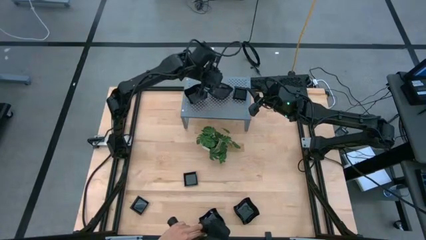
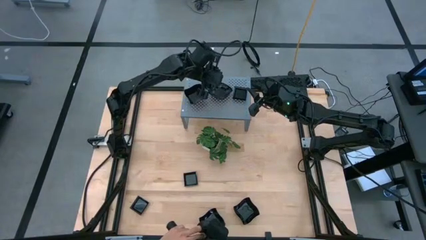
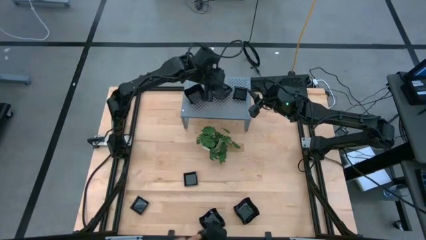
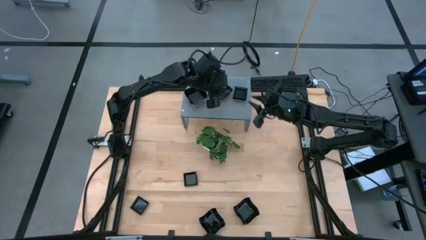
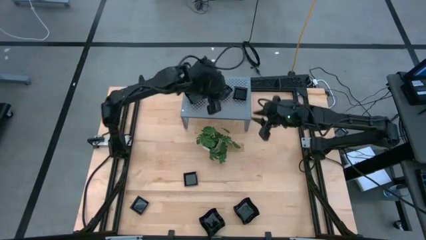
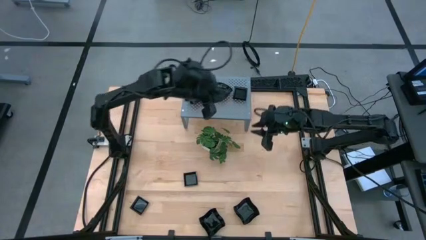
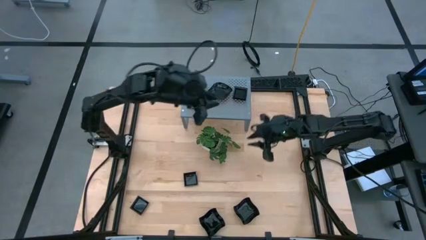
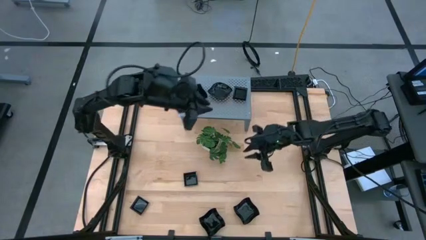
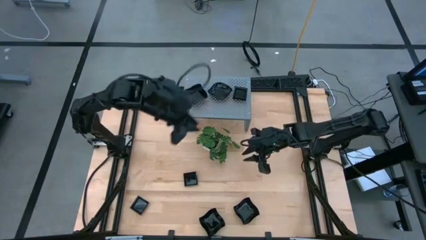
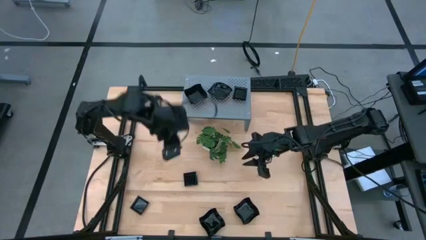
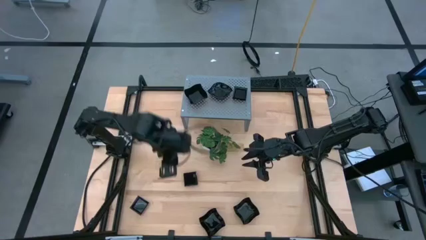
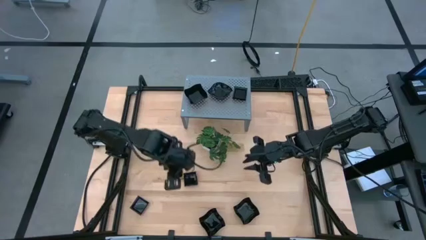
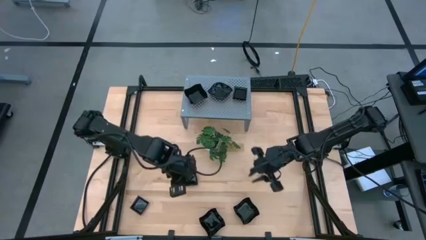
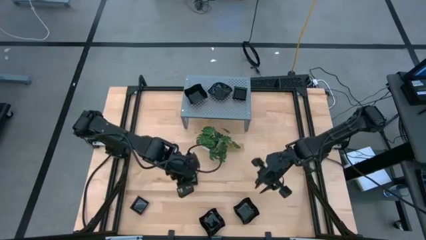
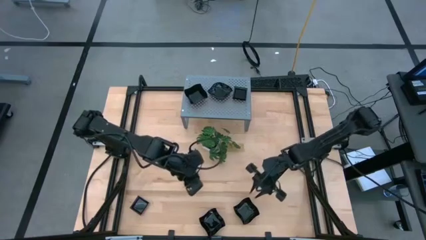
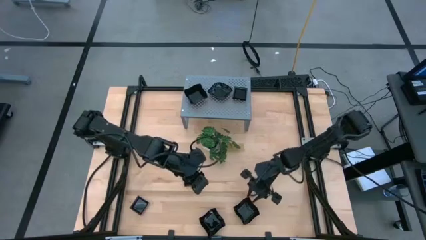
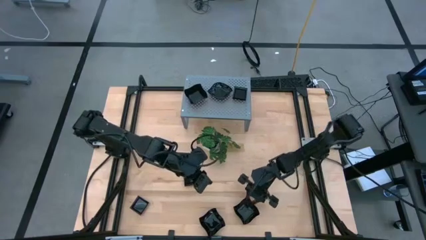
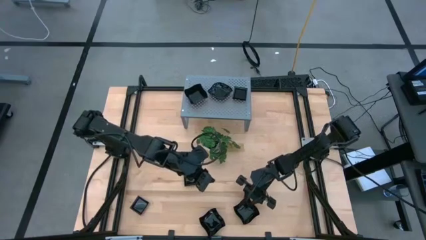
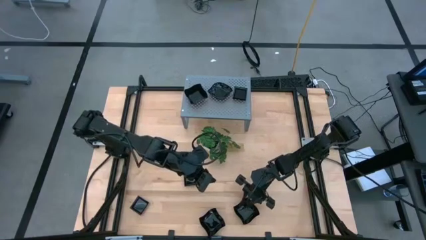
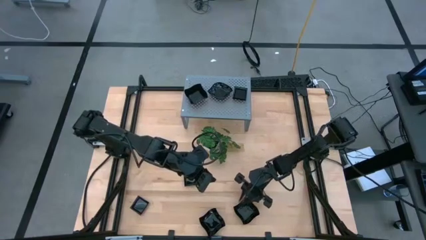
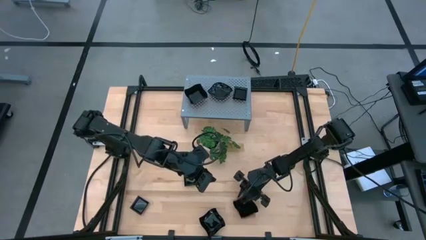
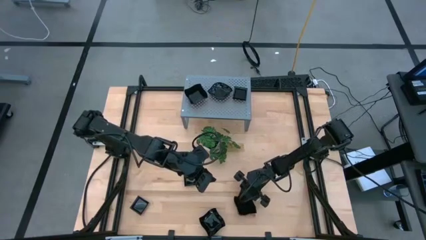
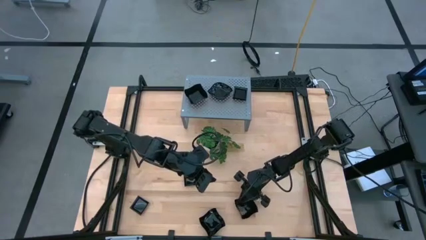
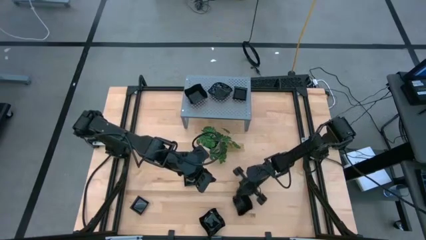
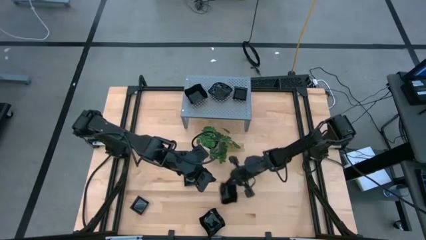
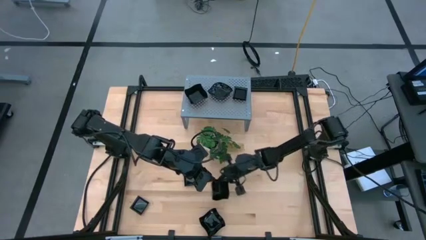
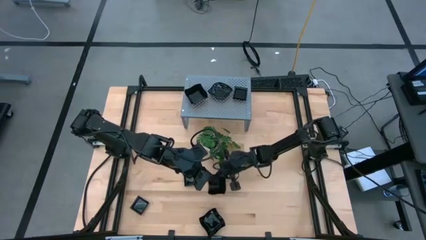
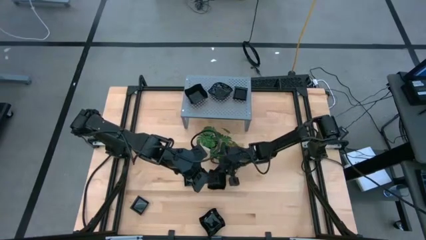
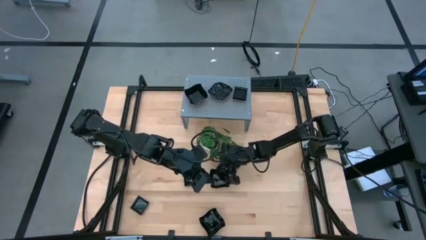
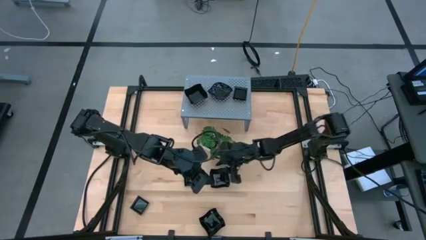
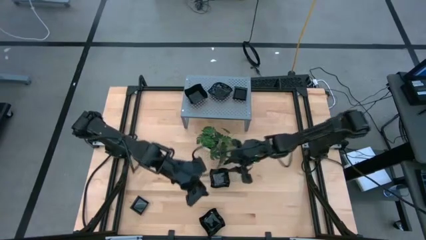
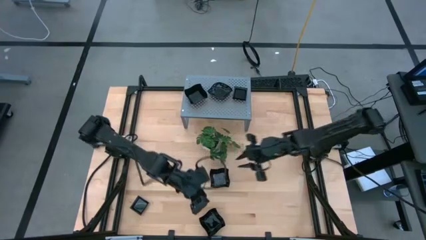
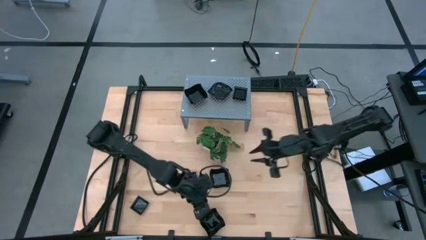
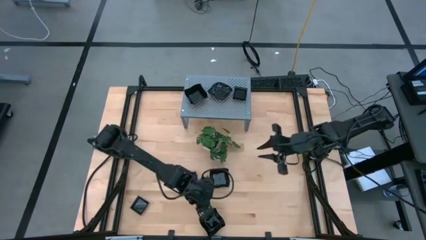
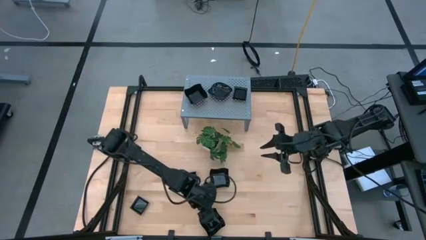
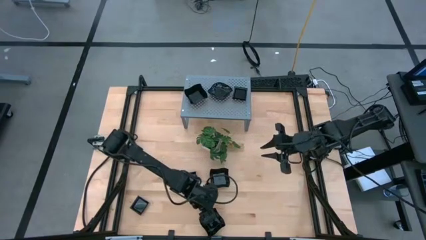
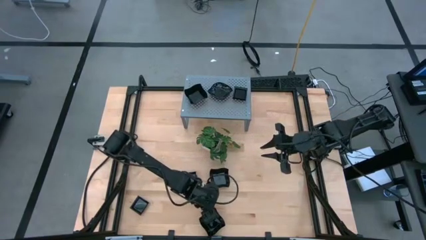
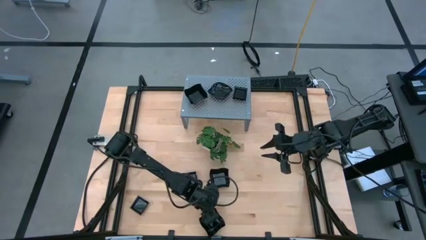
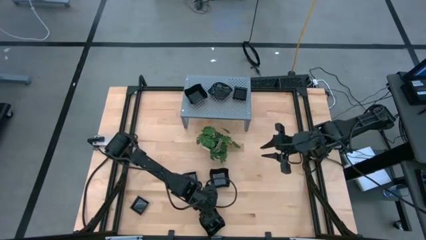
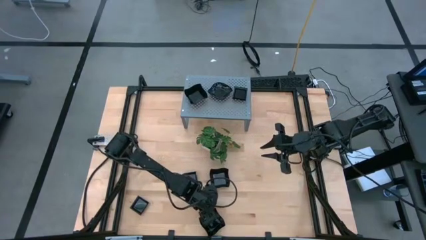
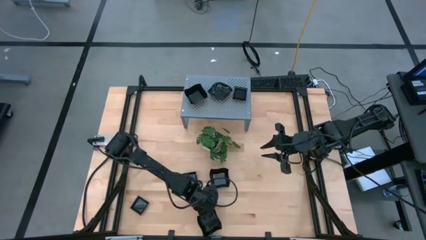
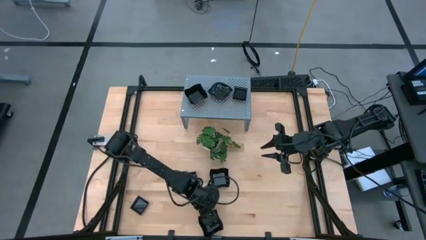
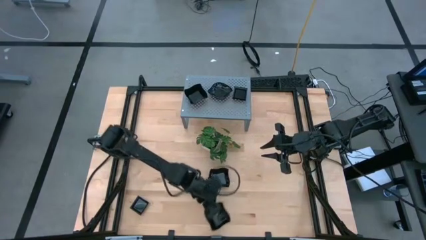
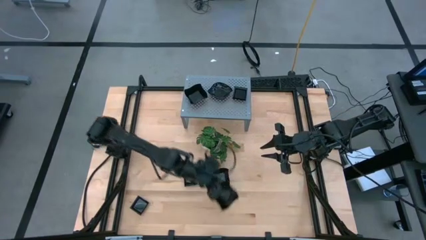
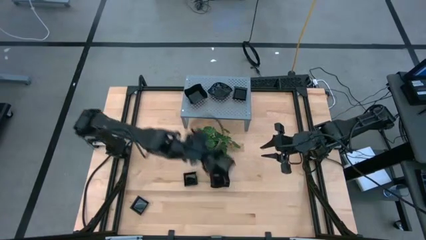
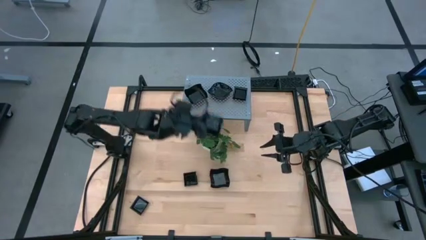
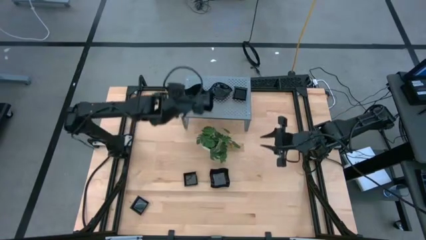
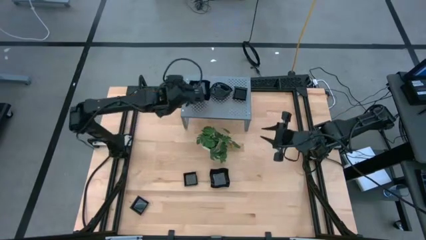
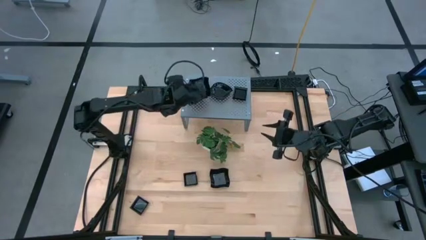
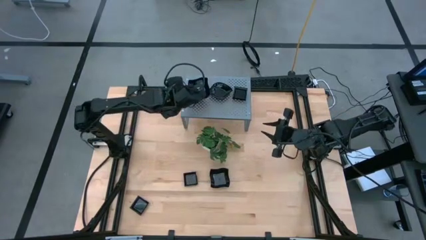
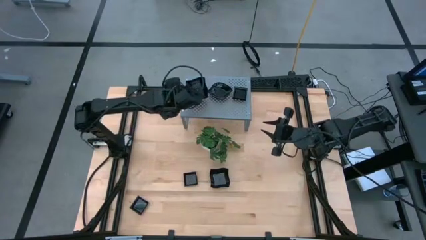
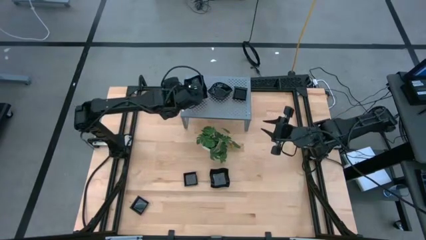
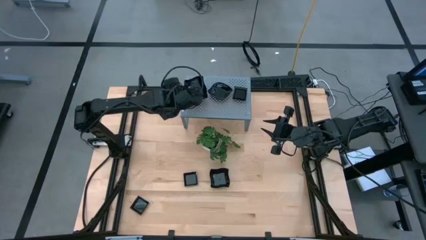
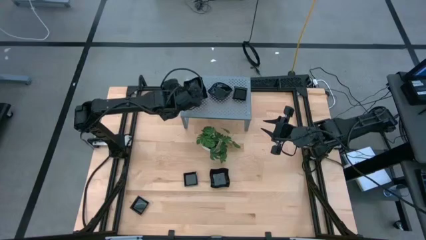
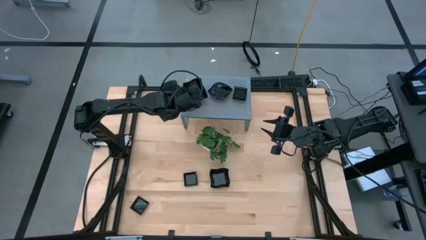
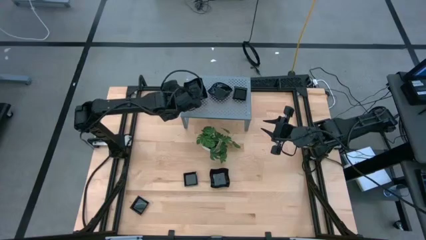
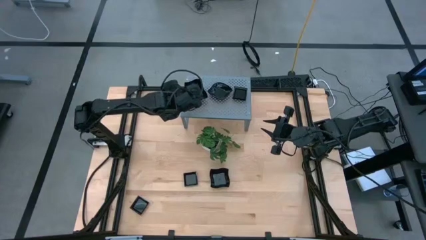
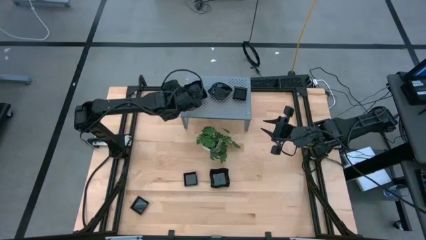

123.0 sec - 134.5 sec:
Task: Pick & Place Mini shaped plates
Stack the distorted square plate on top of the stacked distorted square plates on the shelf

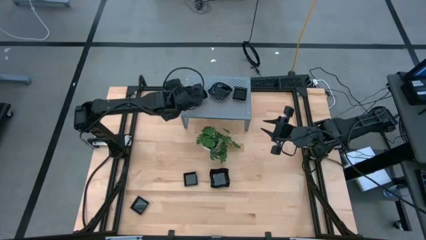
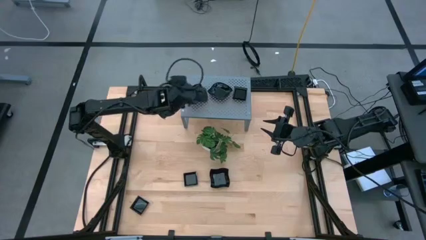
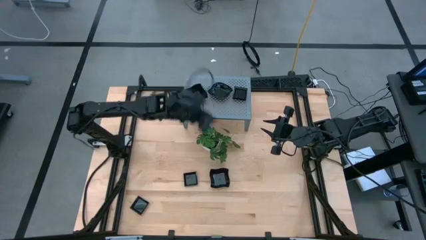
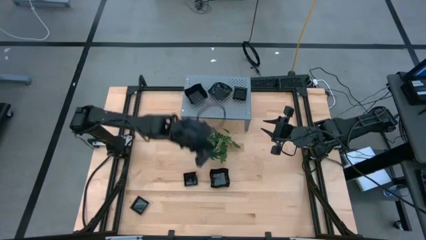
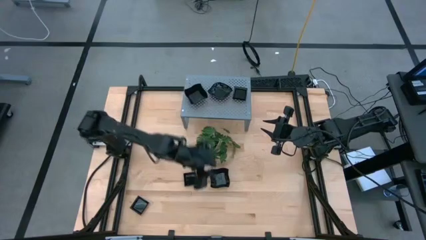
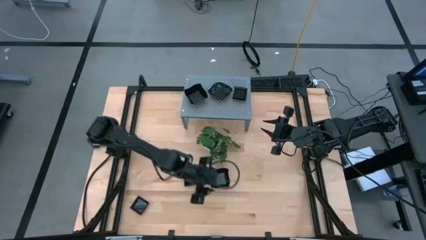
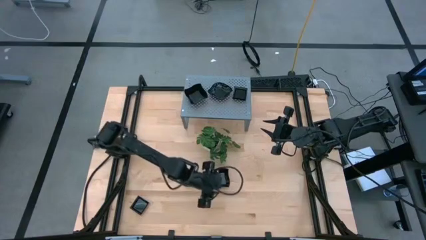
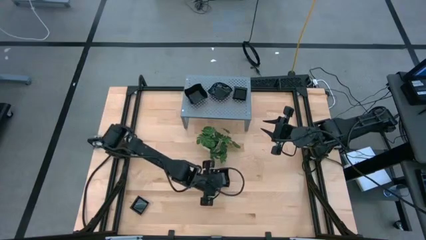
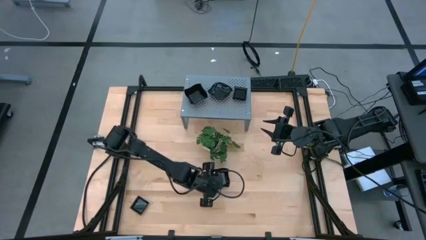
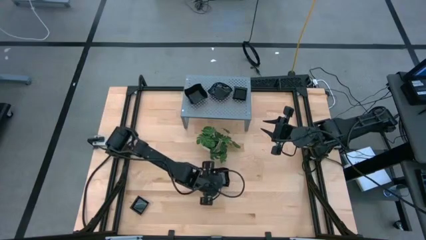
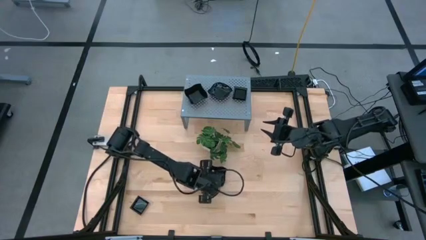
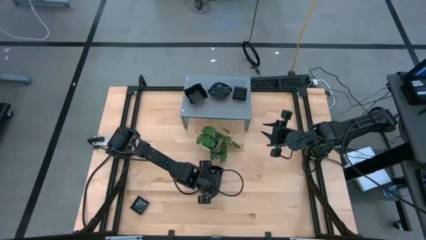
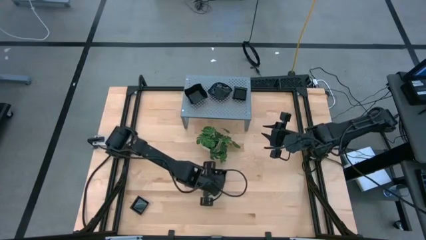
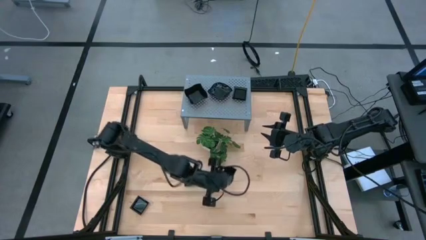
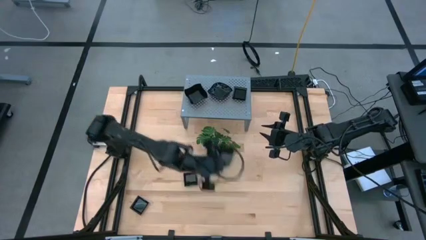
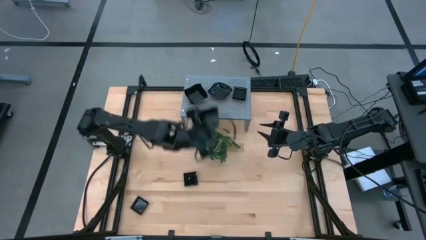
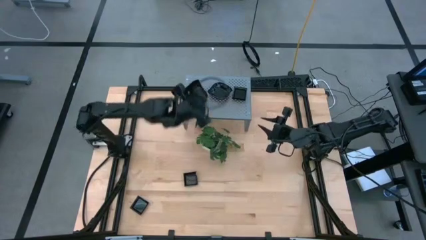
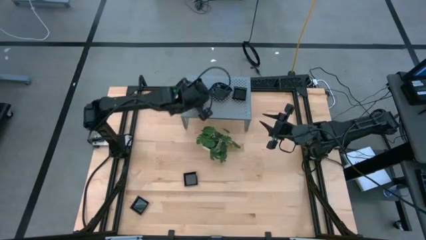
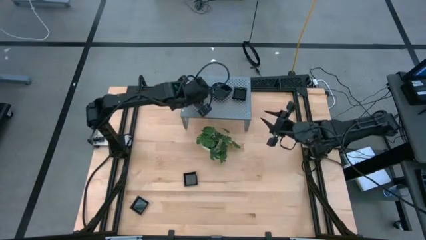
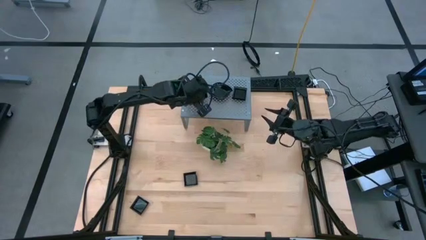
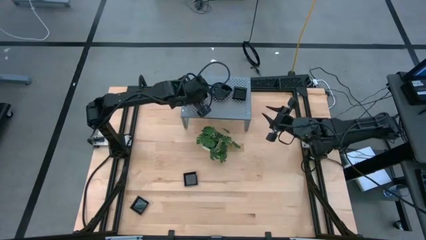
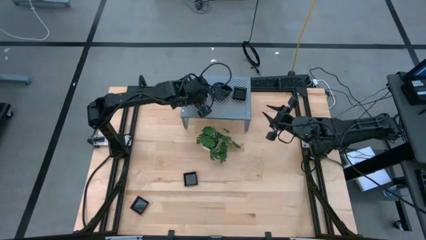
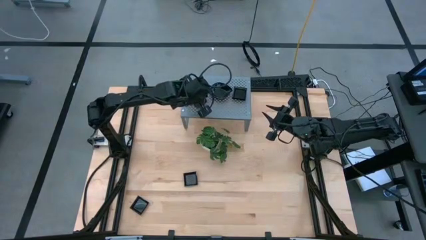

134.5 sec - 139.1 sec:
Stack the distorted square plate on top of the stacked distorted square plates on the shelf
